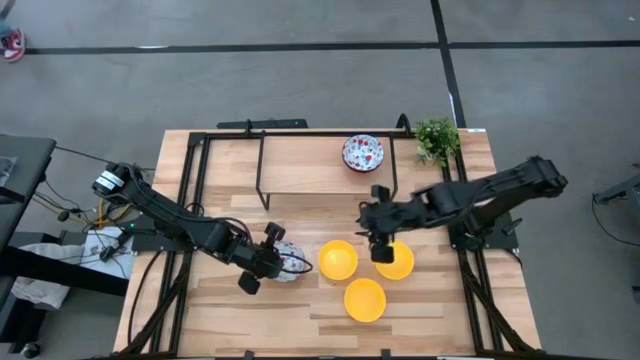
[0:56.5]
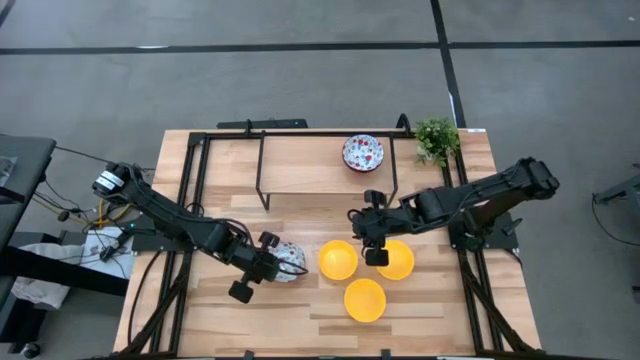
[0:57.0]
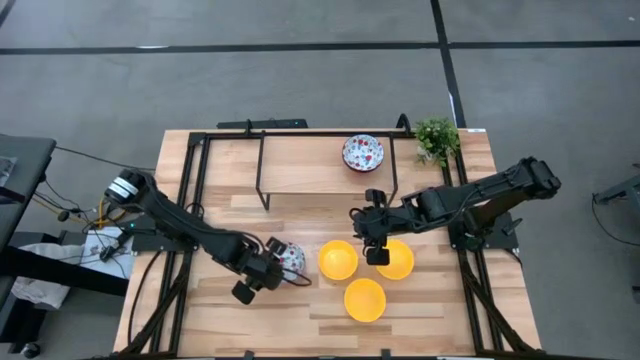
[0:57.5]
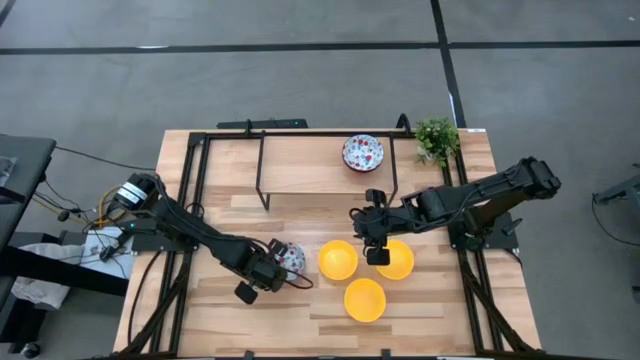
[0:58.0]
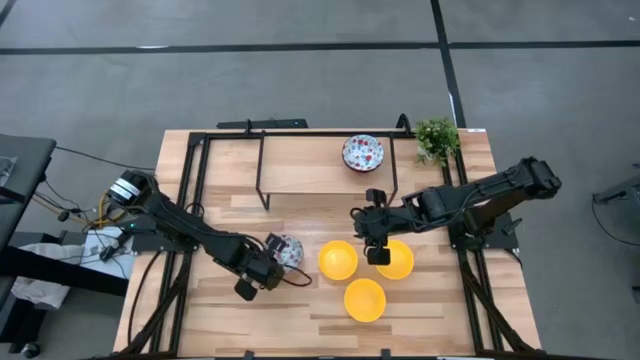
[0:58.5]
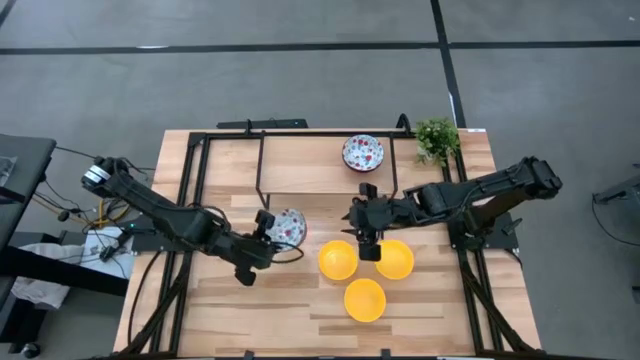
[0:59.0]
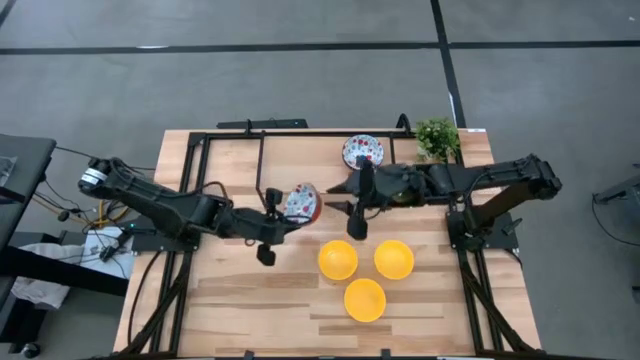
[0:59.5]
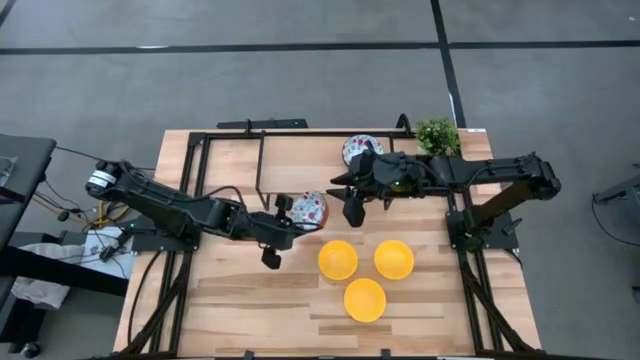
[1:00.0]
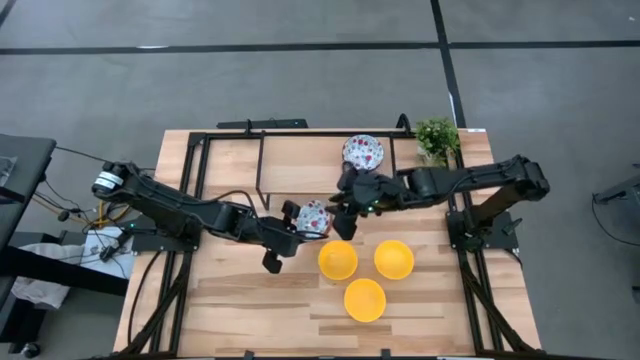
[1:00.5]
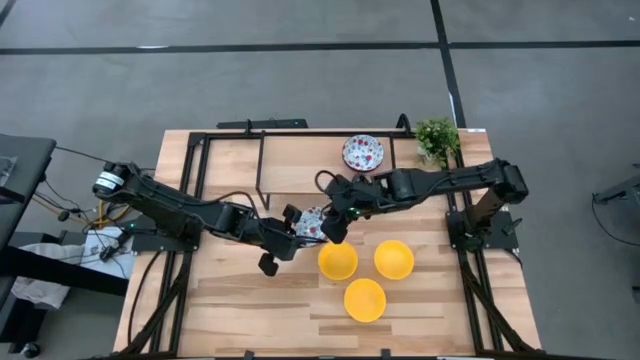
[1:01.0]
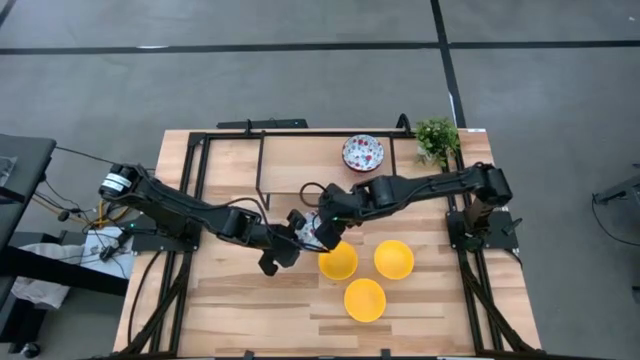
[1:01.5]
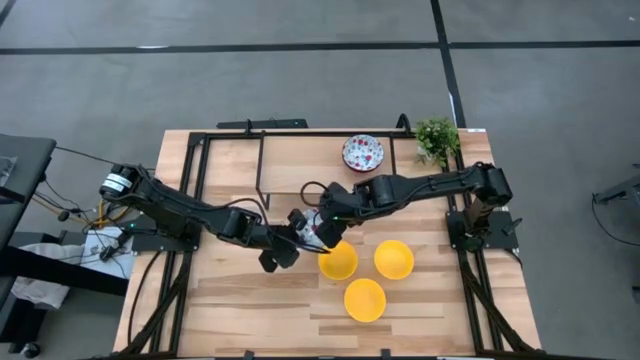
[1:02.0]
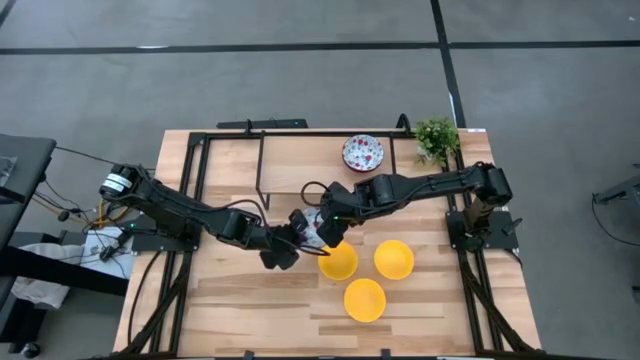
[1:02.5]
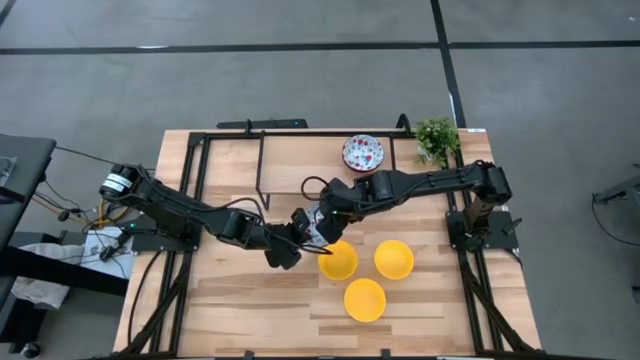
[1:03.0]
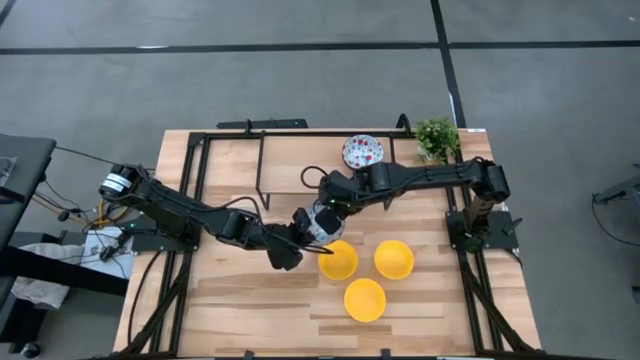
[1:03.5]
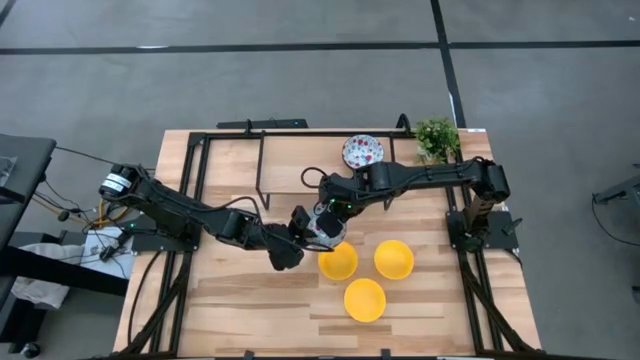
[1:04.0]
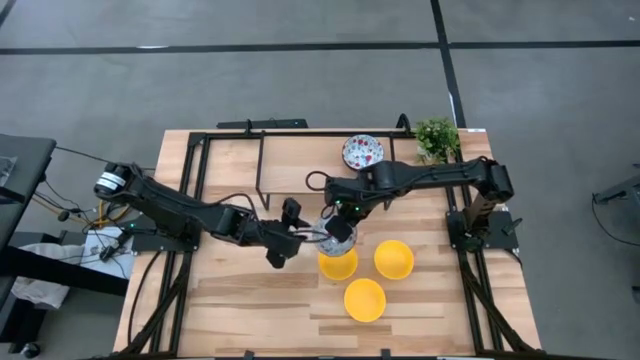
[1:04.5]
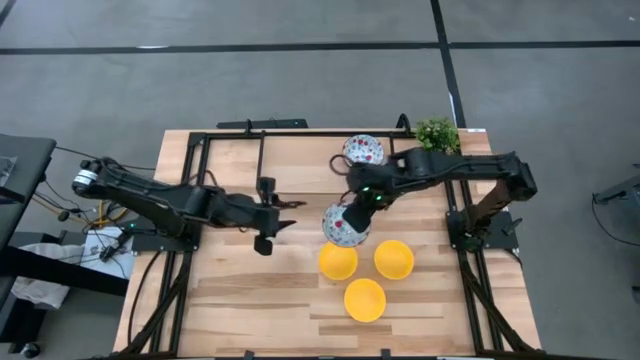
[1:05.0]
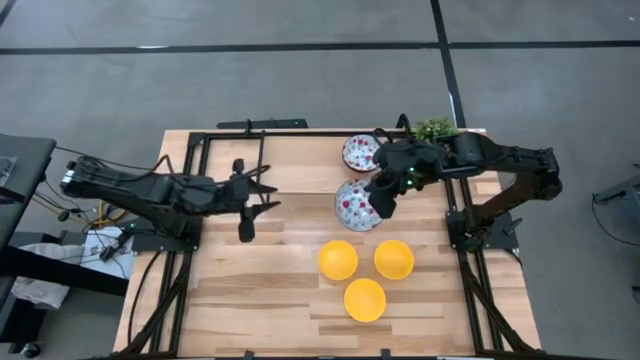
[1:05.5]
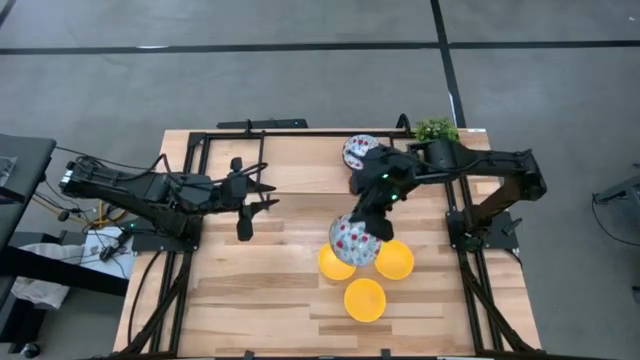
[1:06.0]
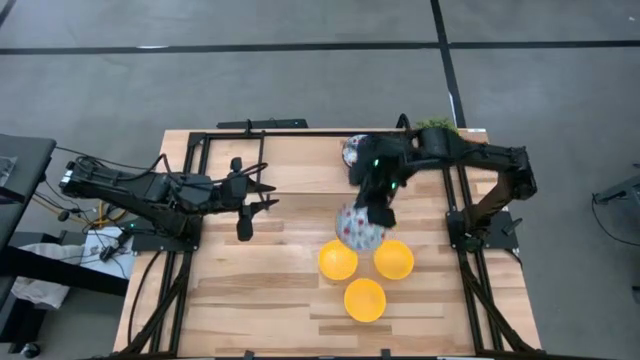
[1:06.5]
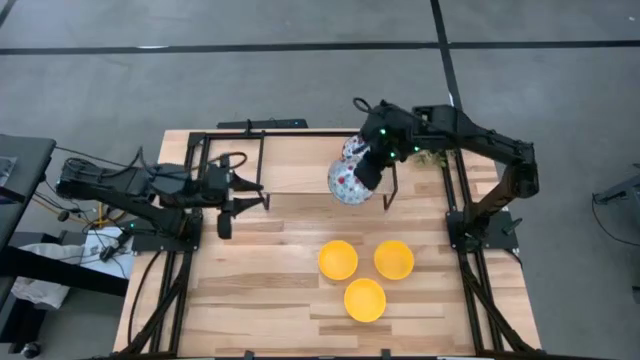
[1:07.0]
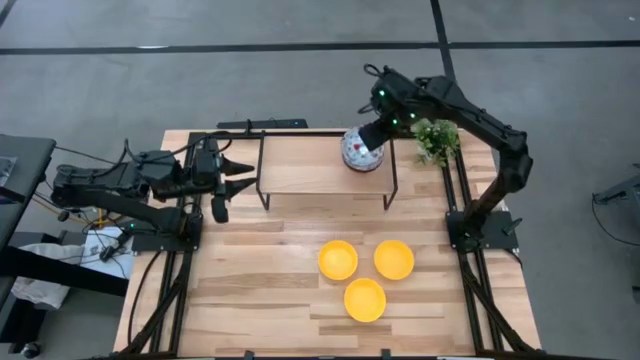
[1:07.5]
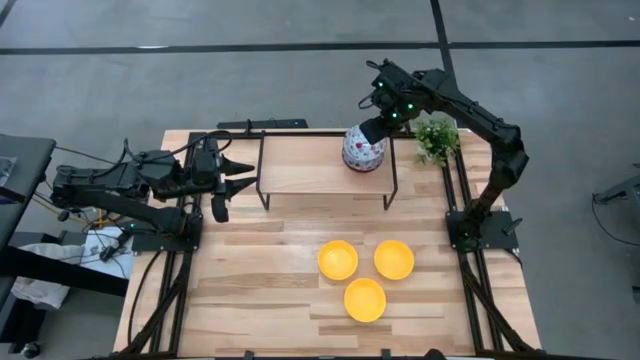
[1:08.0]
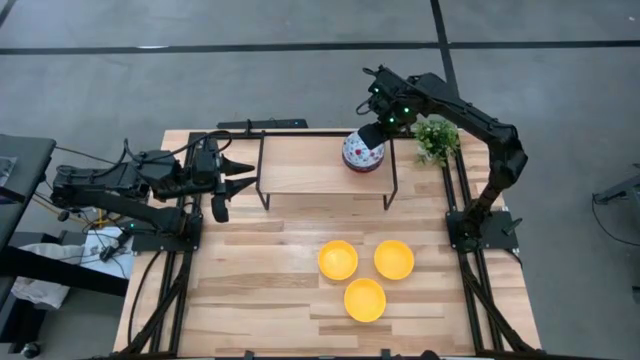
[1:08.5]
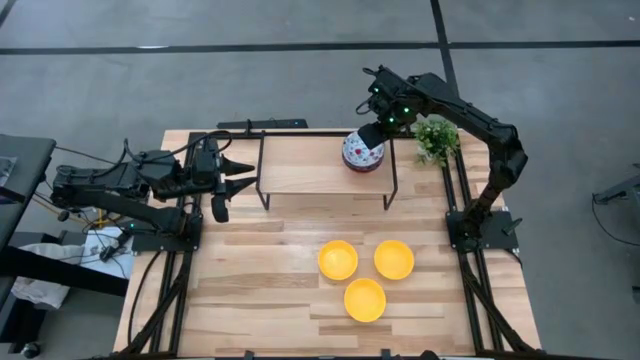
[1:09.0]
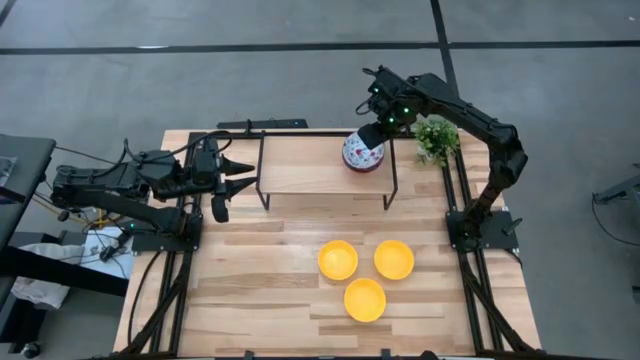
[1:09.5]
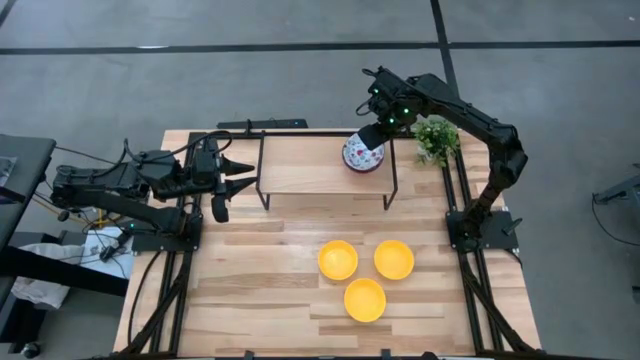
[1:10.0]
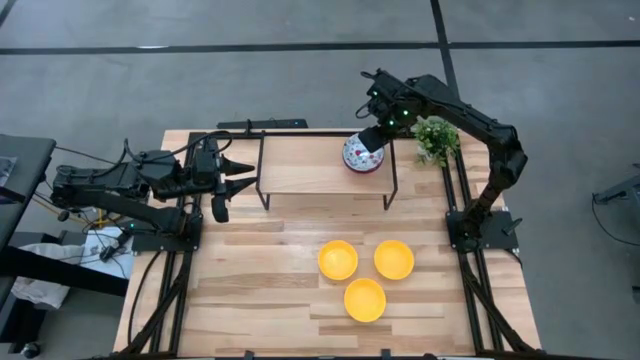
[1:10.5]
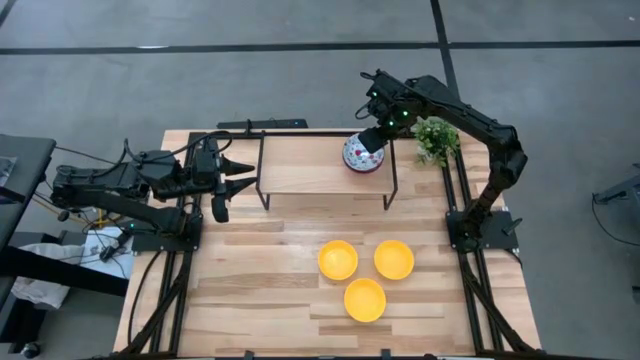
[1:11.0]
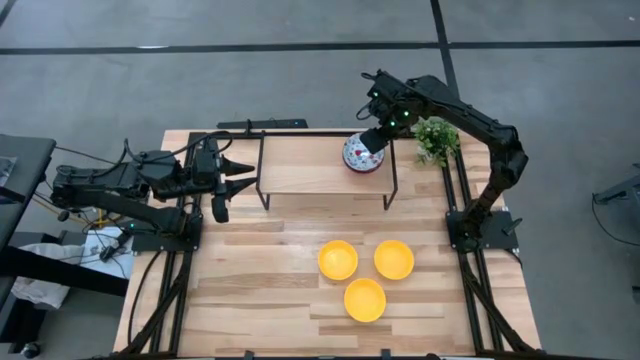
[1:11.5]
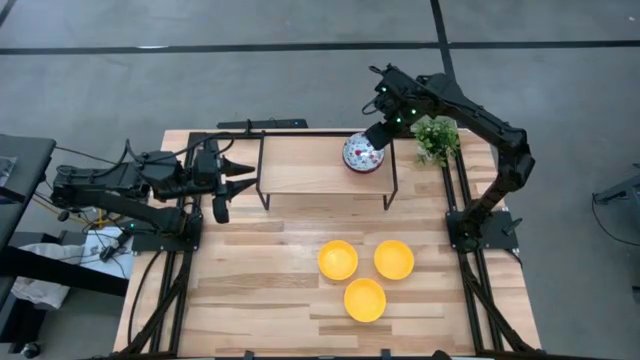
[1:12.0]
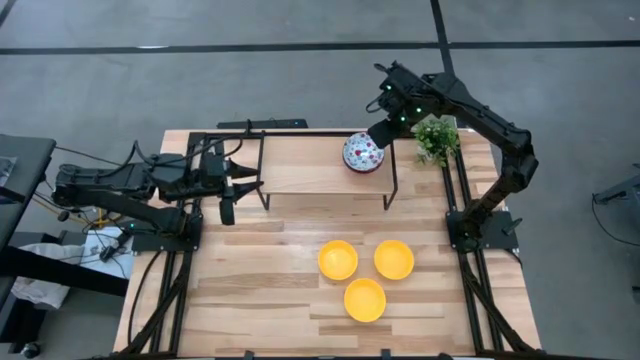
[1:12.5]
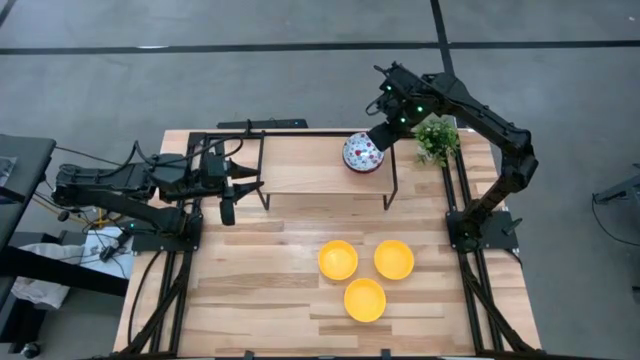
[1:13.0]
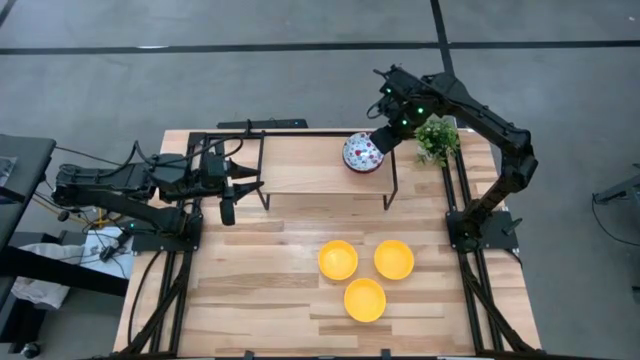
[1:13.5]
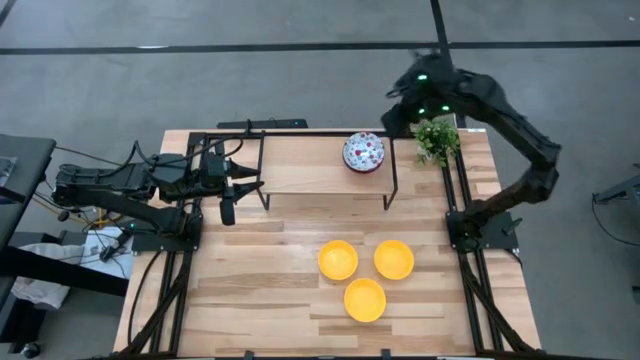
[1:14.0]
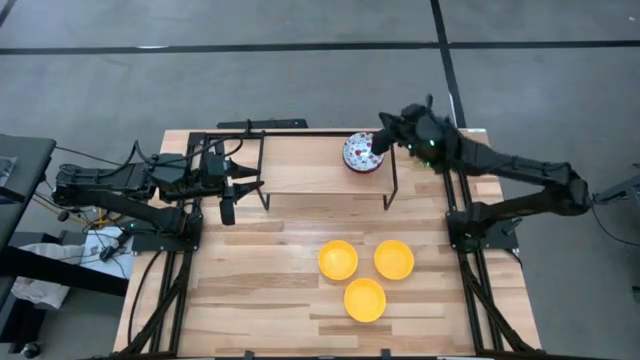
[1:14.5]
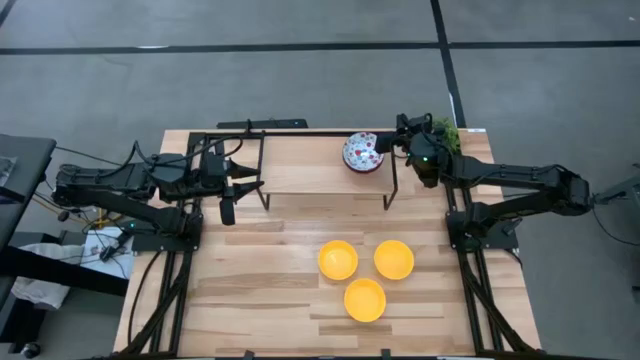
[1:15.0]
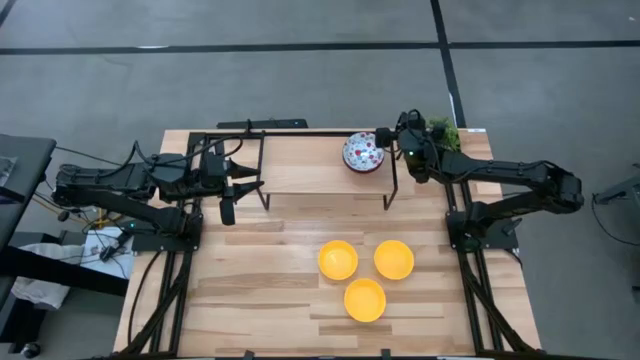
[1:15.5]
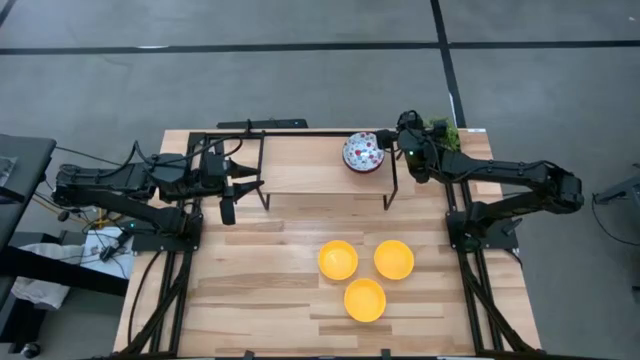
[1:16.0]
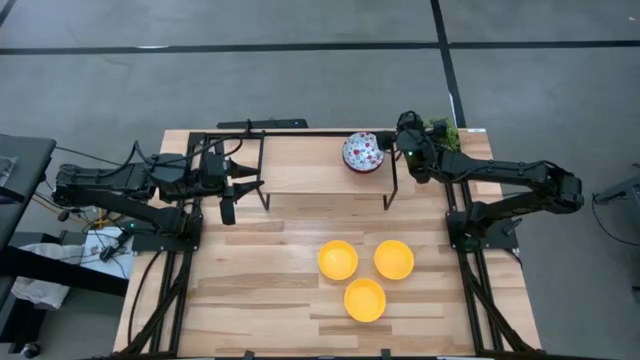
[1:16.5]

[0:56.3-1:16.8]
Task: Pick & Place Mini bowls
Stack the red patterned bowl on top of the red patterned bowl on the shelf

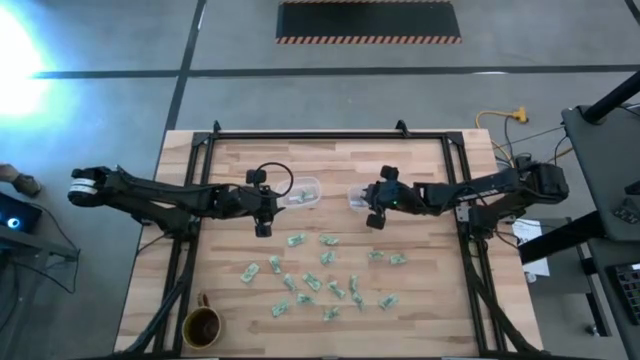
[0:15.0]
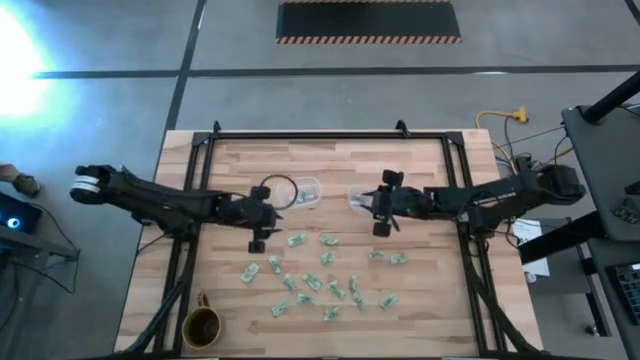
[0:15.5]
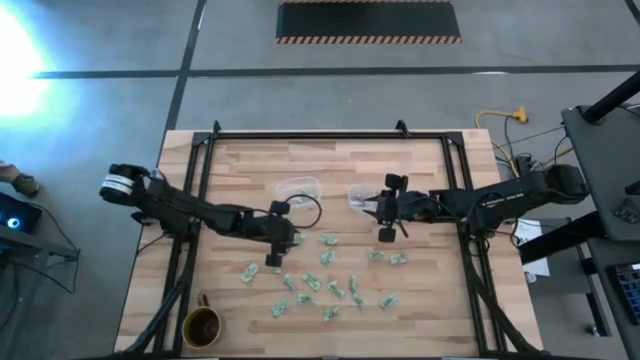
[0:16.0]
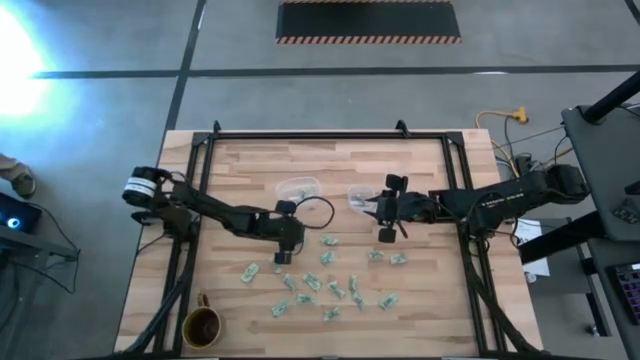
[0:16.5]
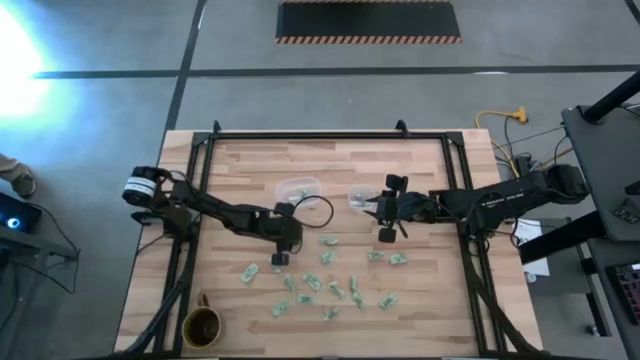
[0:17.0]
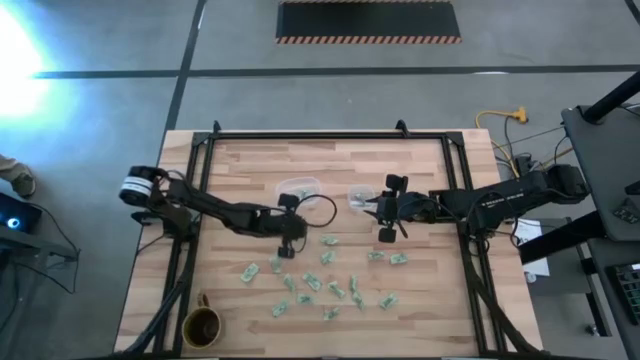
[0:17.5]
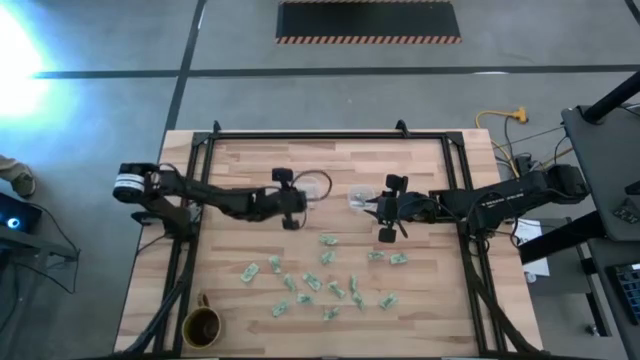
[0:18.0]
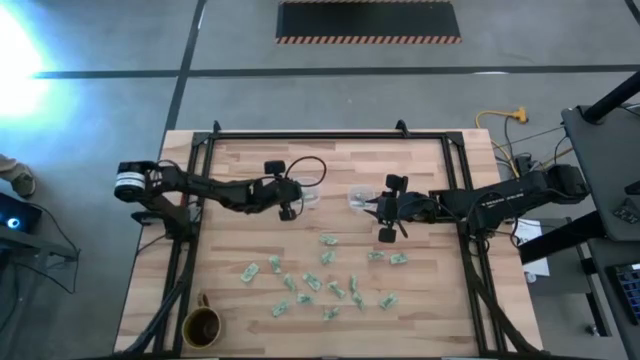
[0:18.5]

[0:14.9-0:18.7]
Task: Pick and place Stevia / Truvia into bins
Put the stevia packet into the transparent oval container
